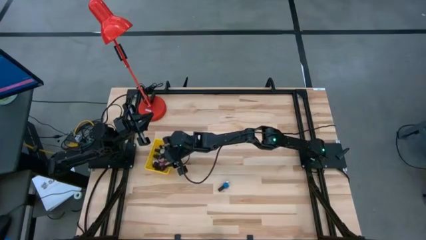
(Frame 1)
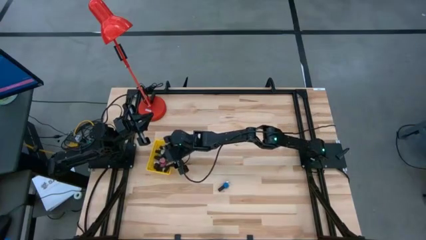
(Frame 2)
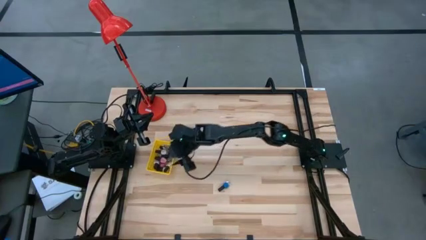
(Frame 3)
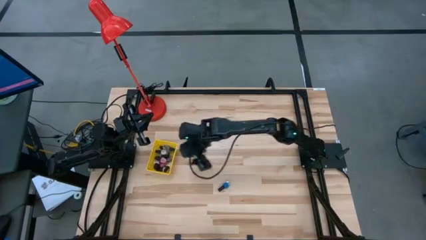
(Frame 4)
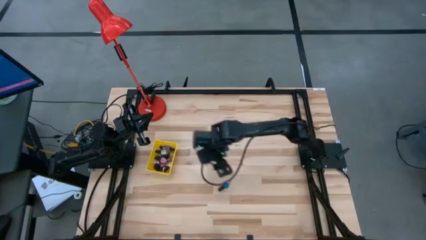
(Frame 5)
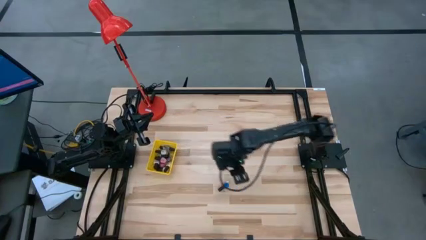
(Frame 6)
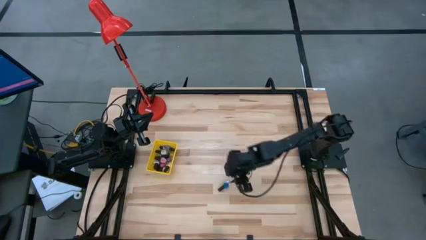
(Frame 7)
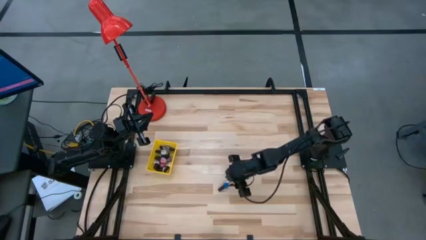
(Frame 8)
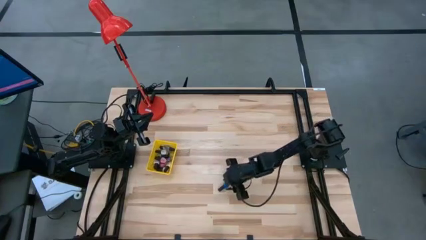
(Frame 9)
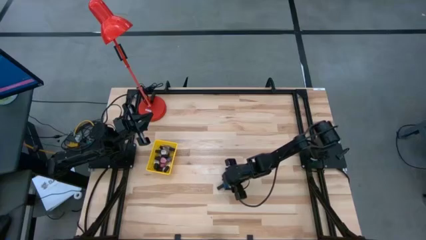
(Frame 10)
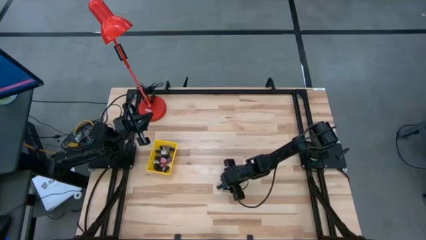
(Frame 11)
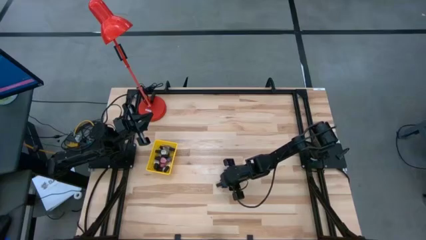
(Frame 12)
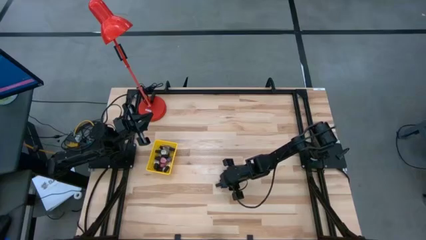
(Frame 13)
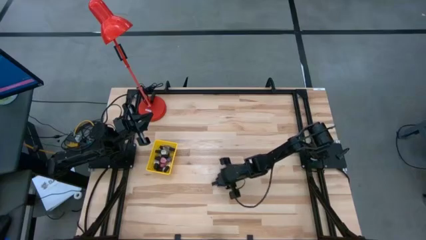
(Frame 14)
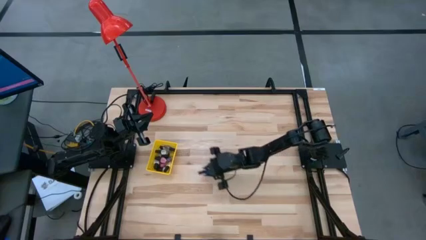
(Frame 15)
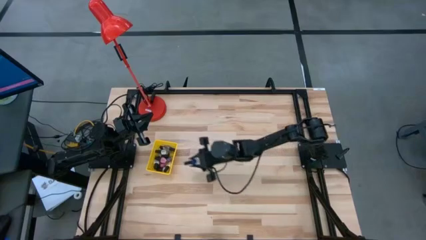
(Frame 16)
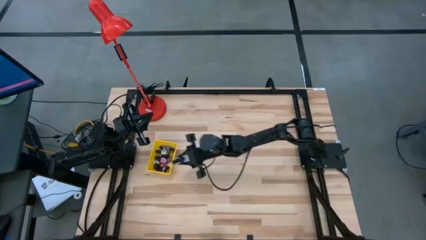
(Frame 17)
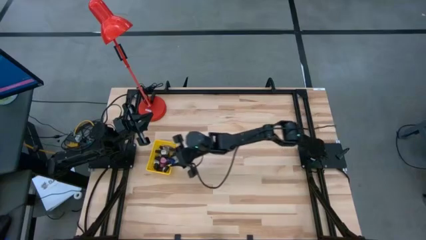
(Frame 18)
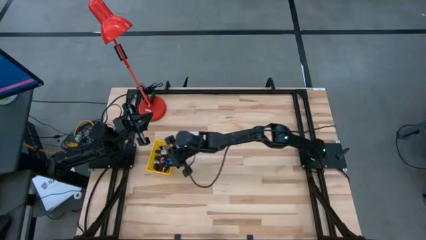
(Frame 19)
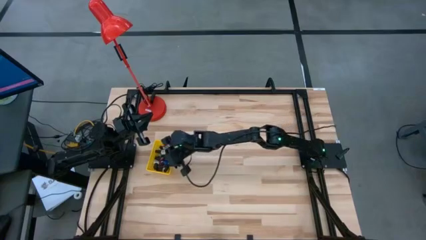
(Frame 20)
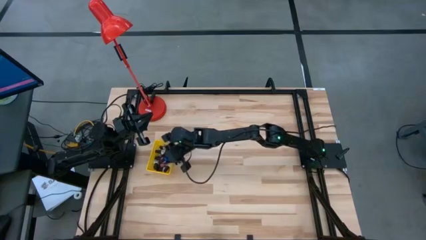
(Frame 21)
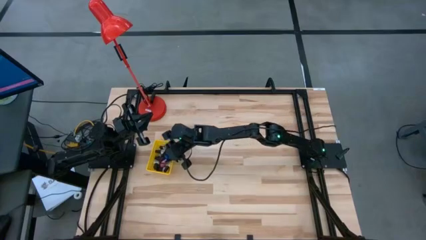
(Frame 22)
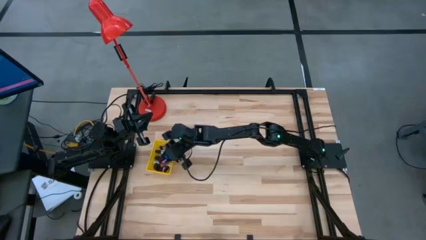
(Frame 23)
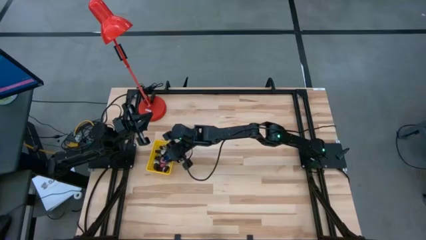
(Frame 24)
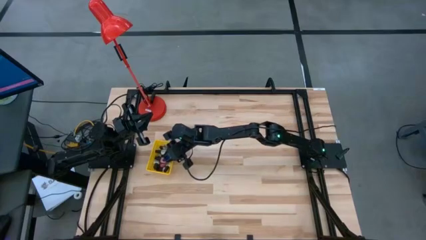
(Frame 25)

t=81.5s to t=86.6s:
Task: Pick & Place Nail Polish
Put the blue nail polish bottle into the yellow basket

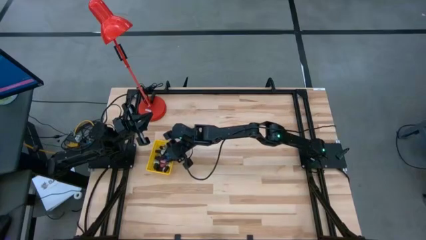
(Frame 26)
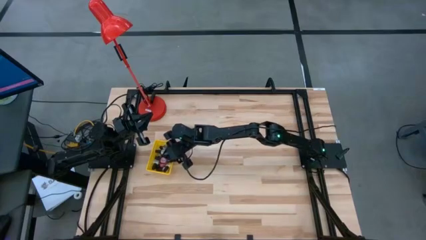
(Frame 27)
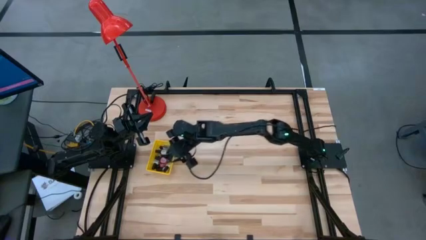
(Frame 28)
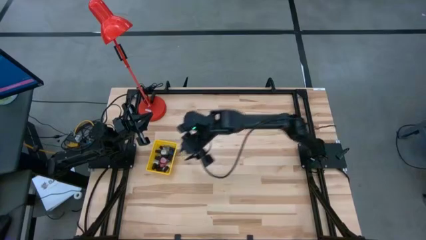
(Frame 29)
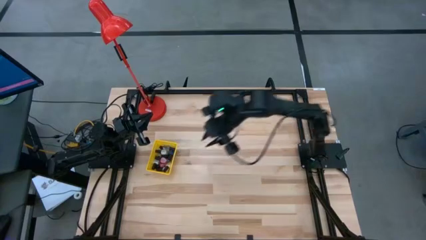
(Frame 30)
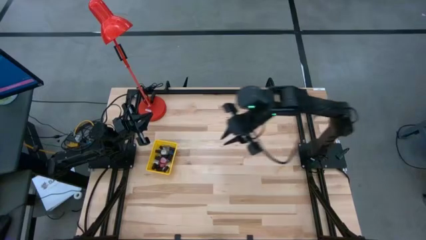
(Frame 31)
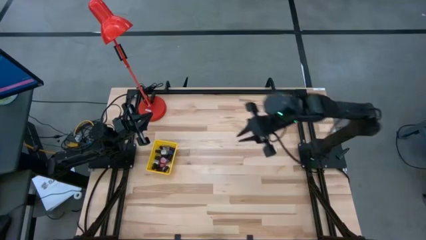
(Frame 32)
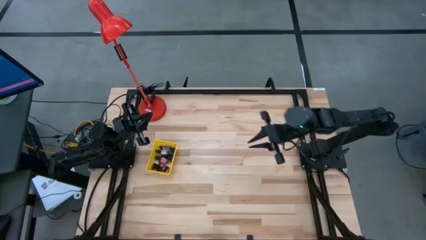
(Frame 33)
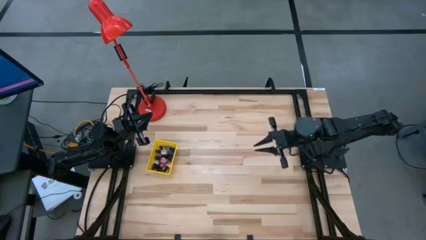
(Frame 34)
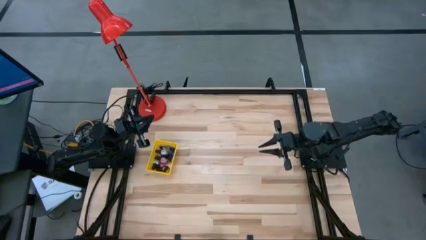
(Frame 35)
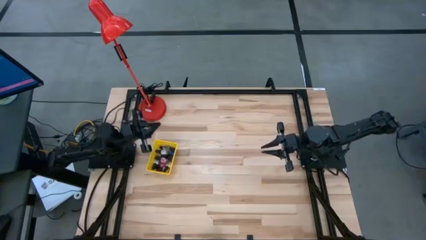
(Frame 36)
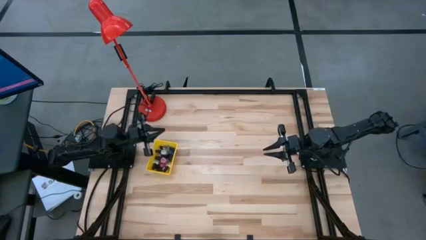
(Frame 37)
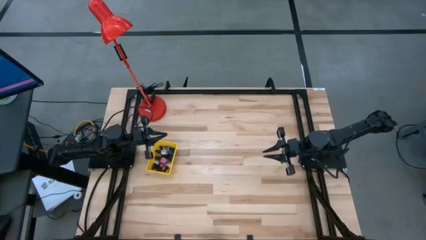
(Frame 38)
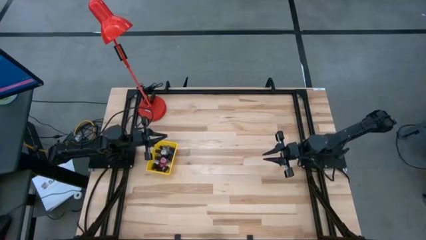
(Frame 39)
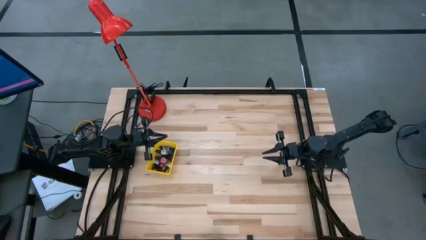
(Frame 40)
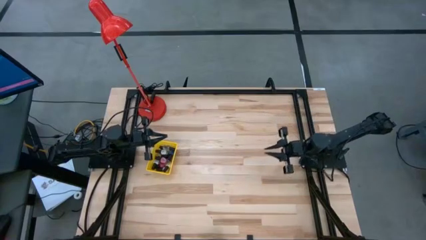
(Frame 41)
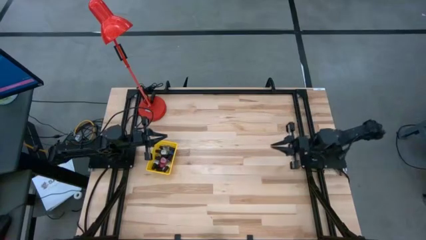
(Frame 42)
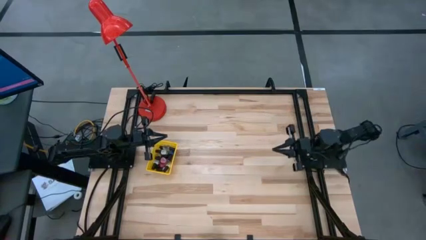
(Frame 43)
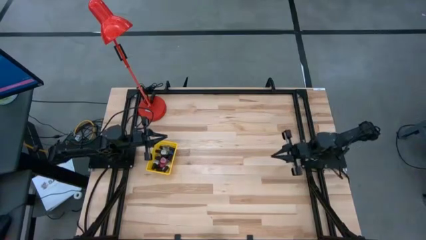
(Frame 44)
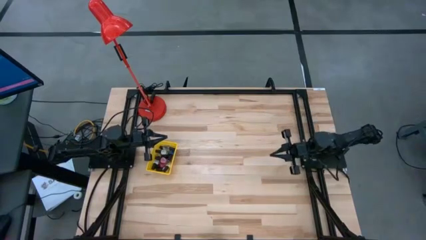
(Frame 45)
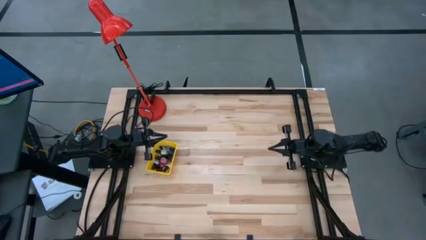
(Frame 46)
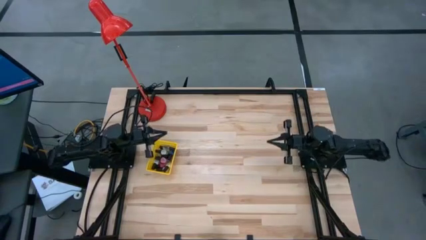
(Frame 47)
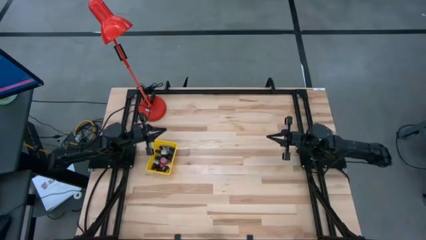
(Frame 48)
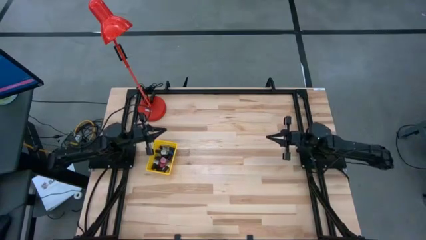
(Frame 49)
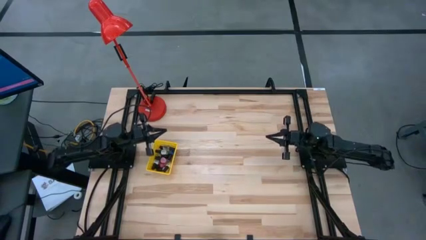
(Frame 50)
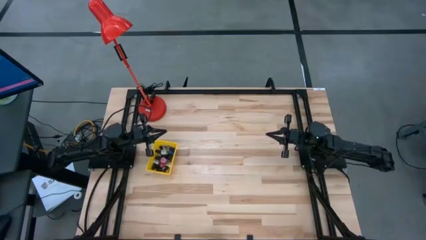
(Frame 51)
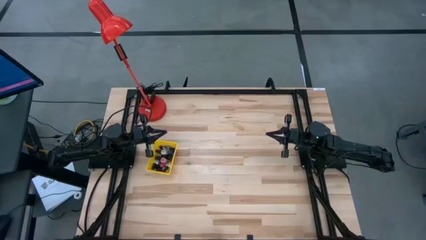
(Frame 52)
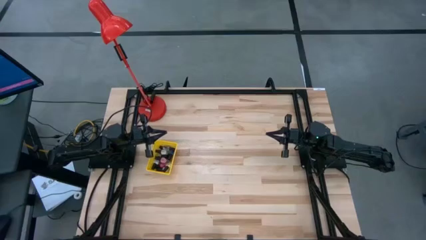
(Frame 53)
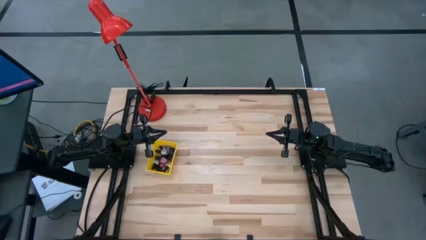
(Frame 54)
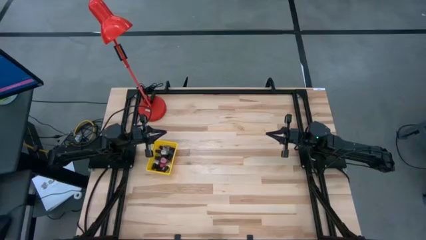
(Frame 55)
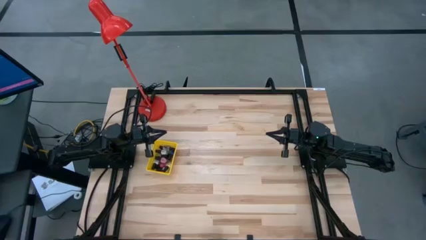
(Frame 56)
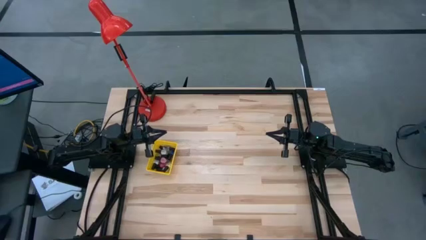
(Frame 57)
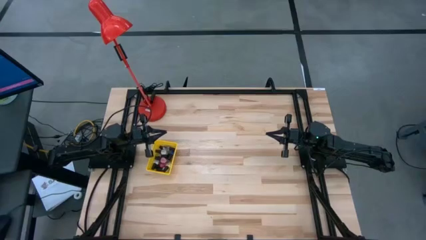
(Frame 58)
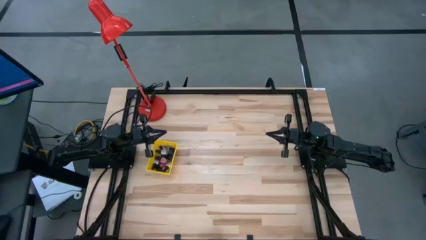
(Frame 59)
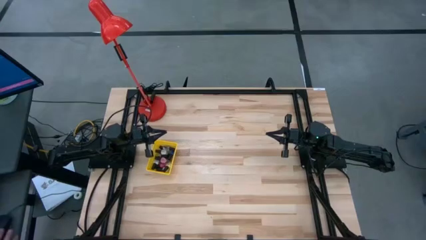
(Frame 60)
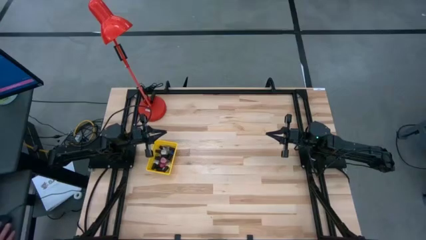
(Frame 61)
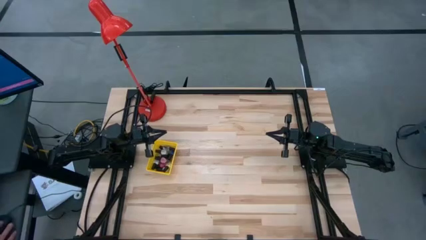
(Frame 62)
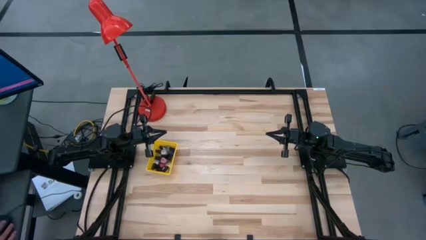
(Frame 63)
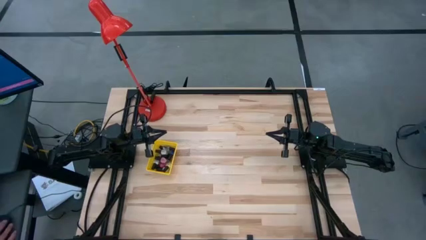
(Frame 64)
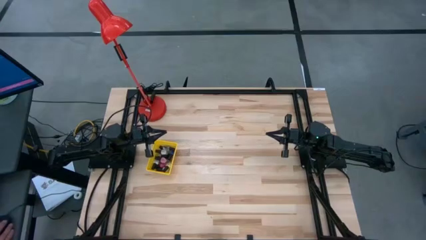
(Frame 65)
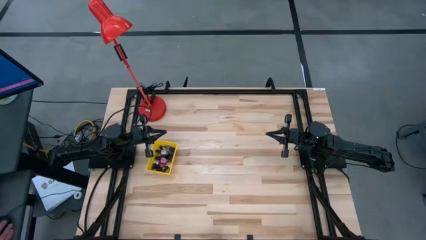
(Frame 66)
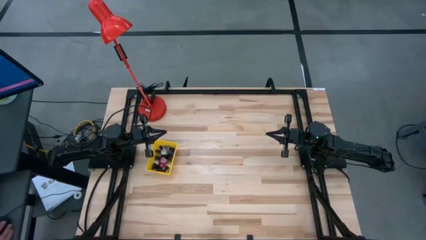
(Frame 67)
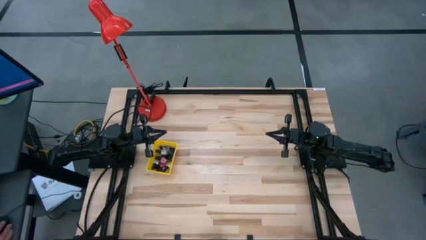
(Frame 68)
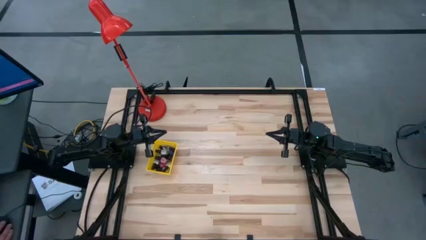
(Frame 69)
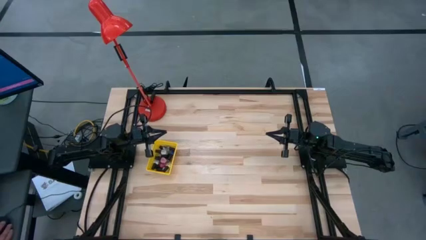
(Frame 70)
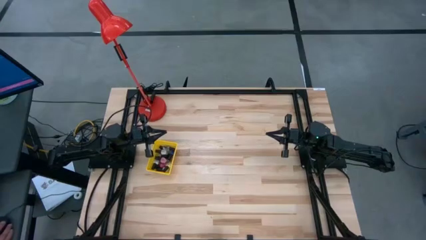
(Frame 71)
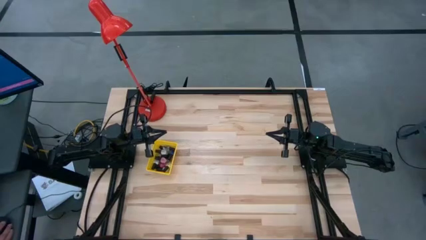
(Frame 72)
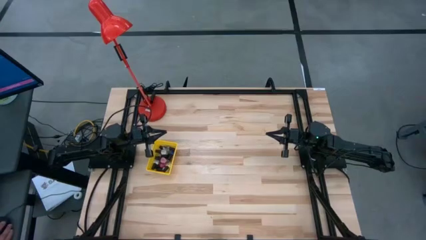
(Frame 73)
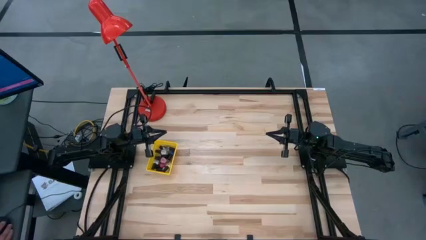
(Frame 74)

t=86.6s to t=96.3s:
Return to Home Position

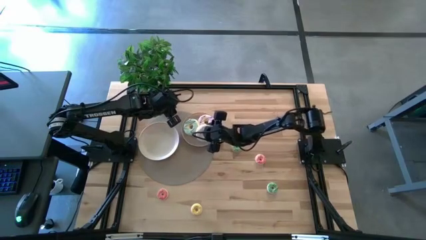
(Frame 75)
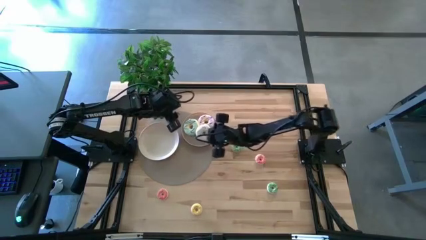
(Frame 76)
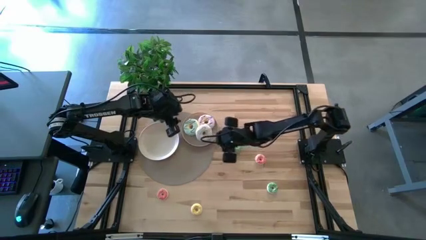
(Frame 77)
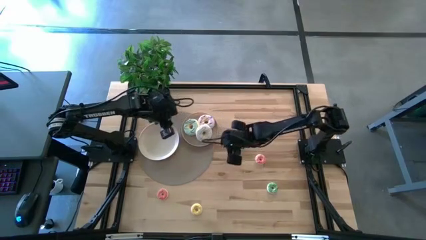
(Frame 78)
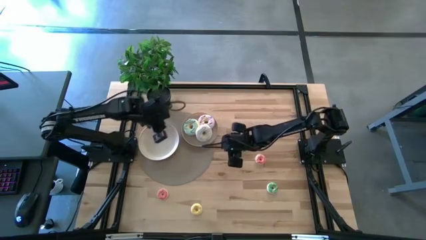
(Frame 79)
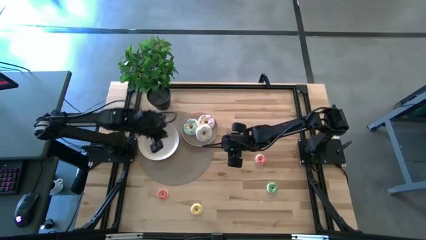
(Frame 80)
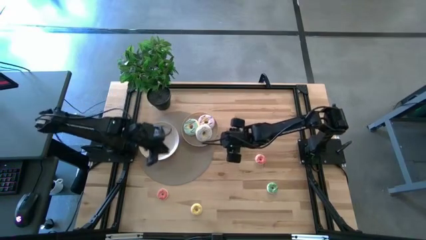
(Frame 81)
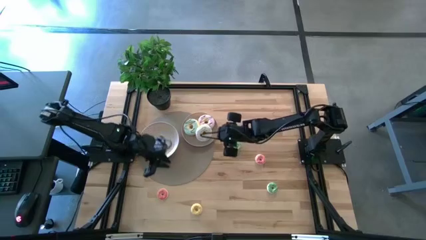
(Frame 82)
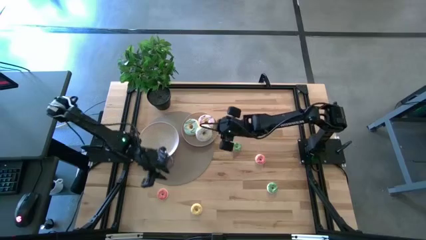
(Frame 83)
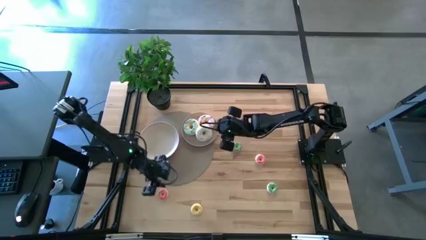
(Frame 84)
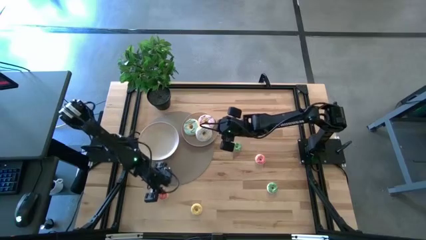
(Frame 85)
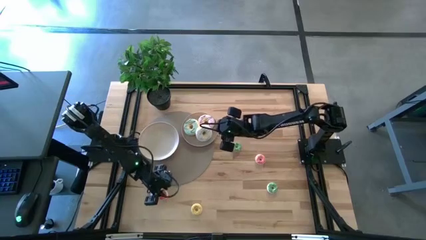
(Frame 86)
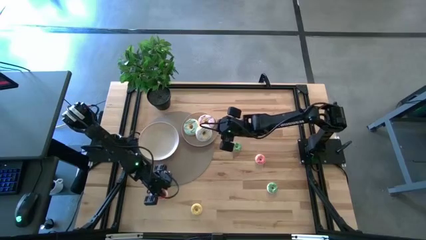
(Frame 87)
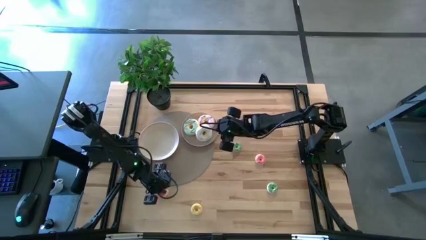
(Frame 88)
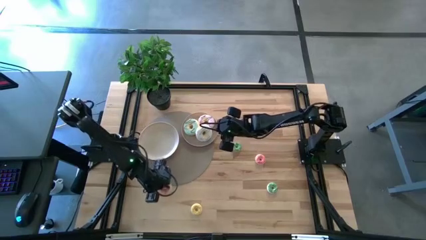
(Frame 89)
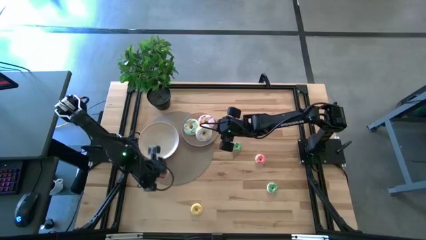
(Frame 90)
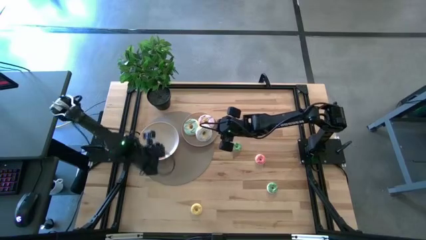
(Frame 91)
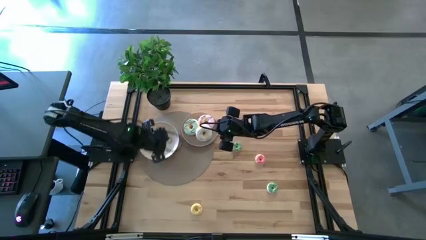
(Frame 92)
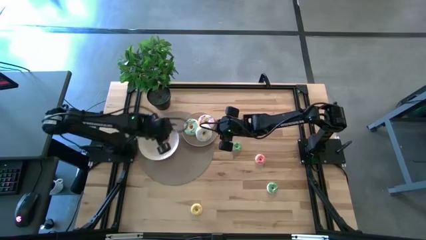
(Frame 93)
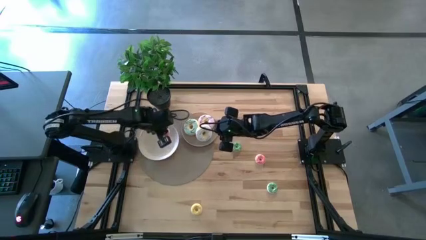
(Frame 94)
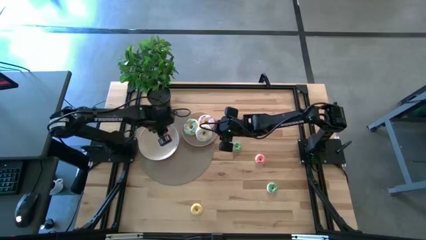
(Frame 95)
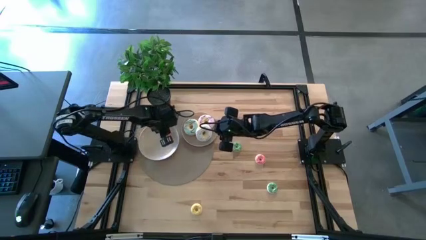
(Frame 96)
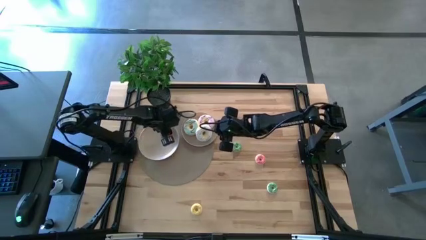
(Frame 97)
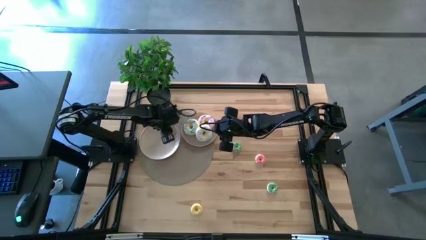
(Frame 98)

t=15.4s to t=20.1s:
Task: Pick & Place donuts
Put the bottom small pink donut on the white plate
